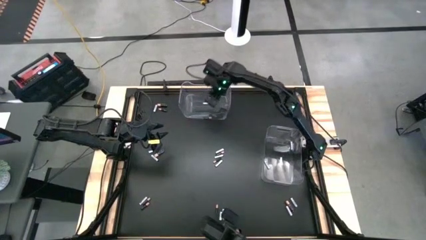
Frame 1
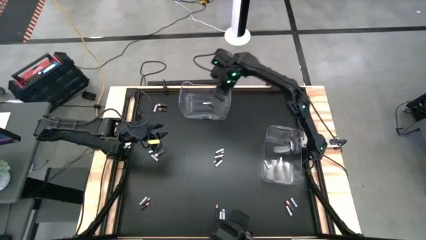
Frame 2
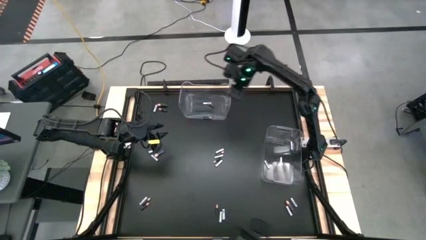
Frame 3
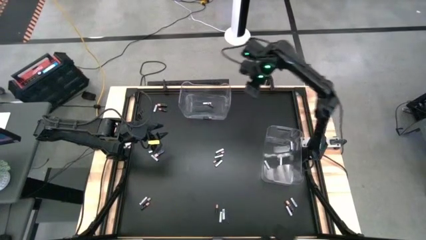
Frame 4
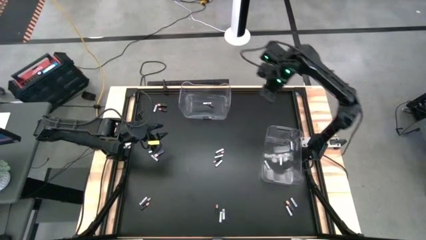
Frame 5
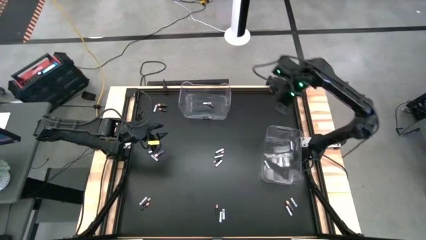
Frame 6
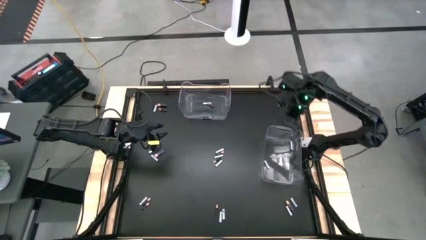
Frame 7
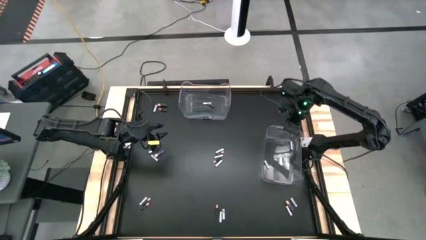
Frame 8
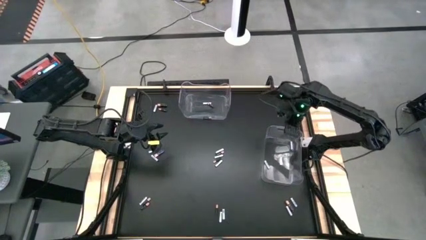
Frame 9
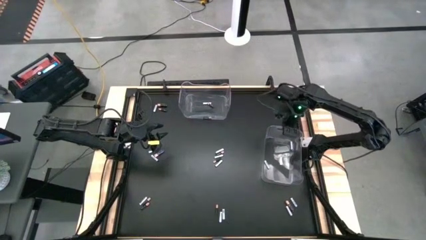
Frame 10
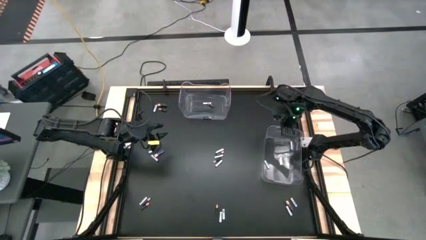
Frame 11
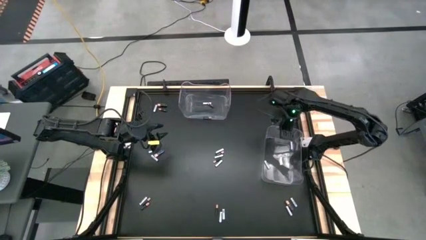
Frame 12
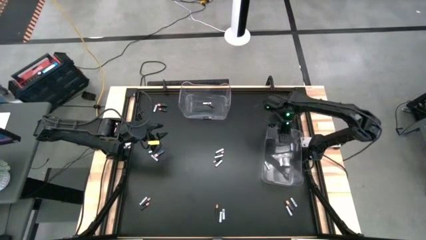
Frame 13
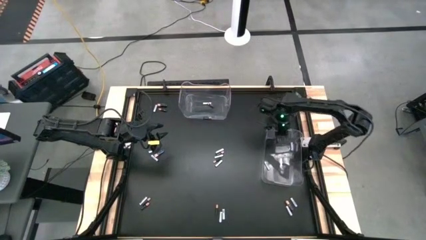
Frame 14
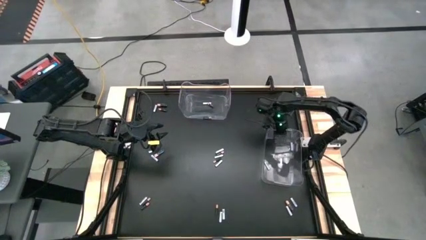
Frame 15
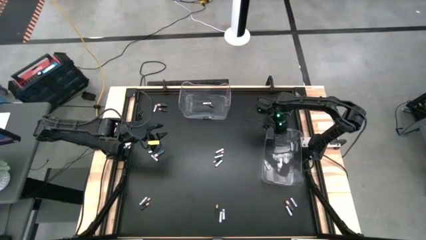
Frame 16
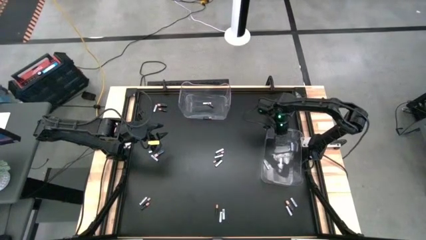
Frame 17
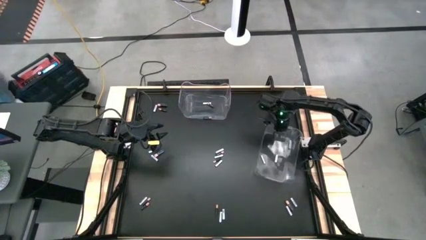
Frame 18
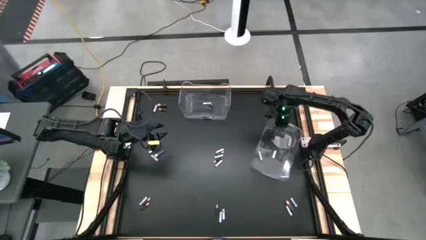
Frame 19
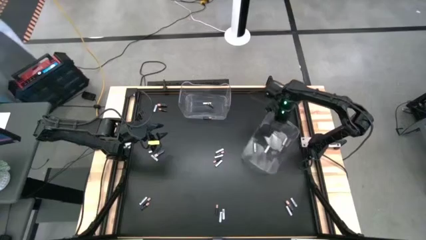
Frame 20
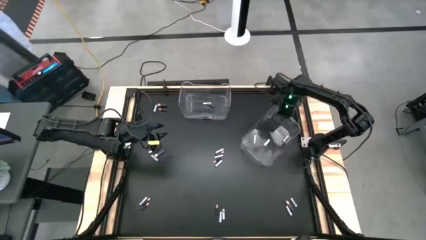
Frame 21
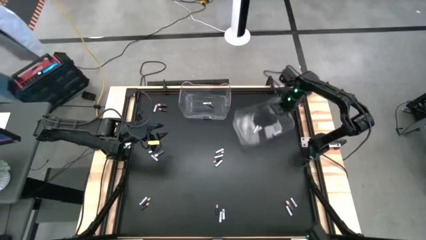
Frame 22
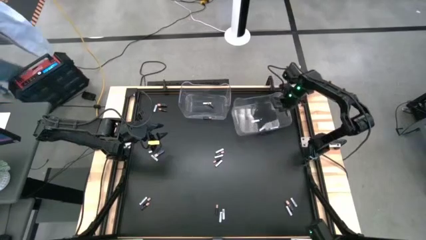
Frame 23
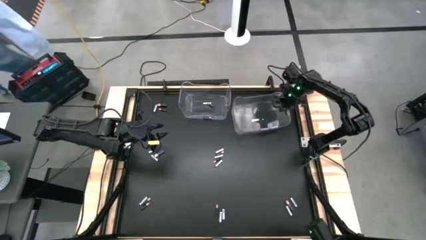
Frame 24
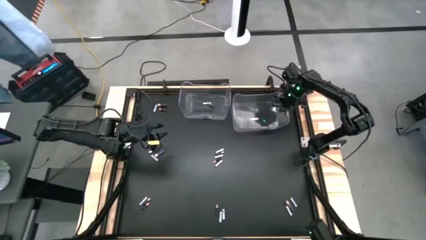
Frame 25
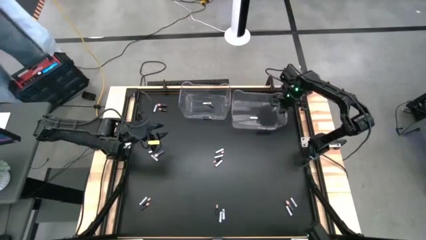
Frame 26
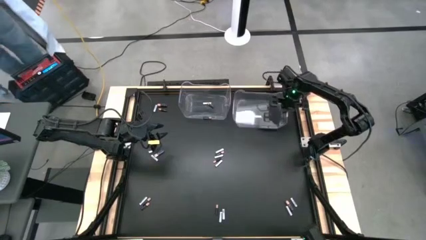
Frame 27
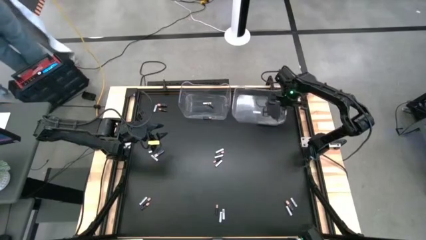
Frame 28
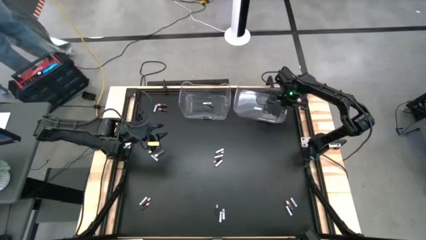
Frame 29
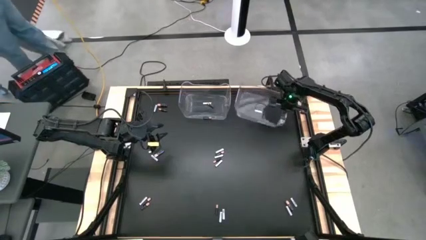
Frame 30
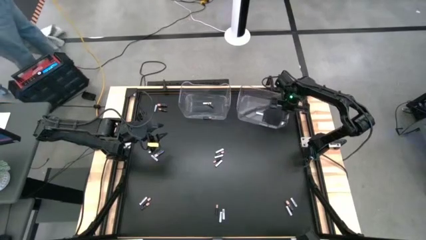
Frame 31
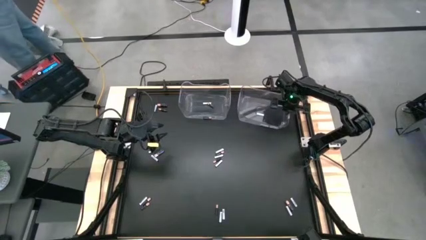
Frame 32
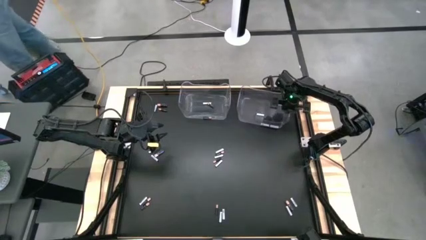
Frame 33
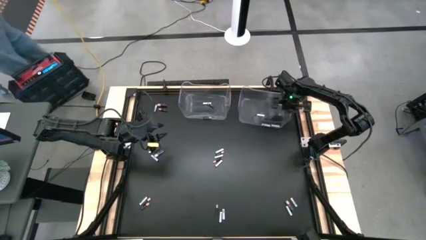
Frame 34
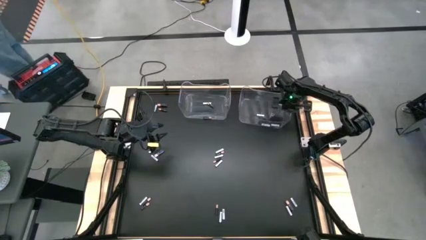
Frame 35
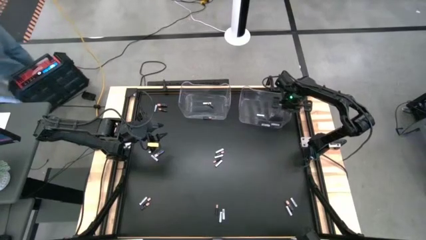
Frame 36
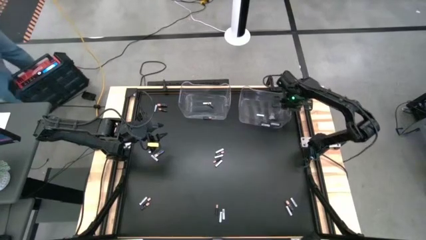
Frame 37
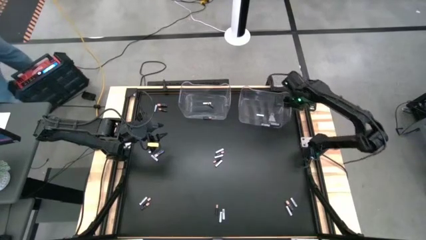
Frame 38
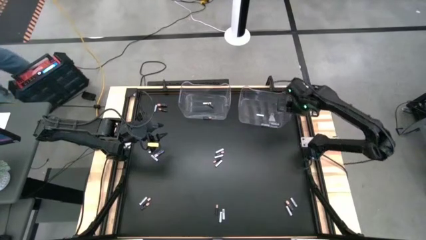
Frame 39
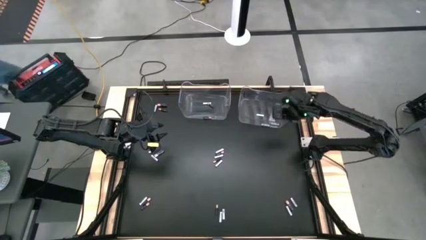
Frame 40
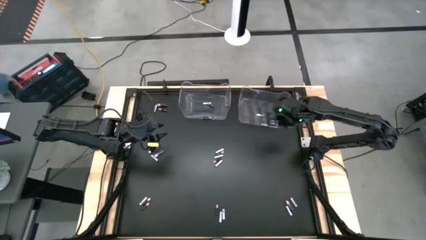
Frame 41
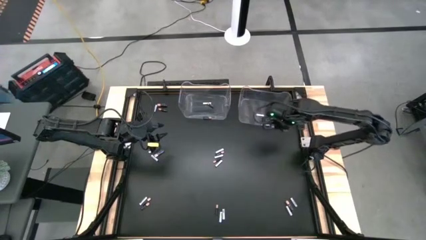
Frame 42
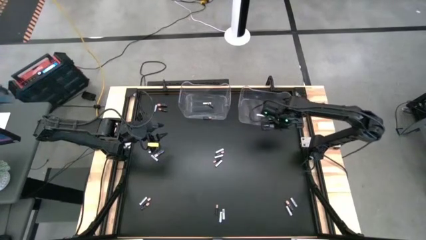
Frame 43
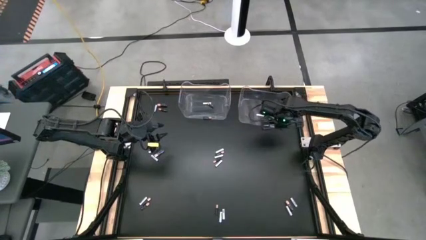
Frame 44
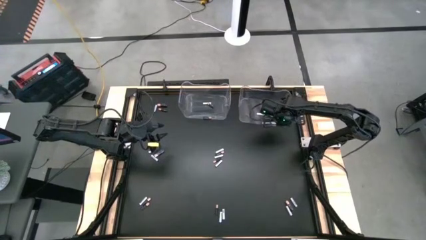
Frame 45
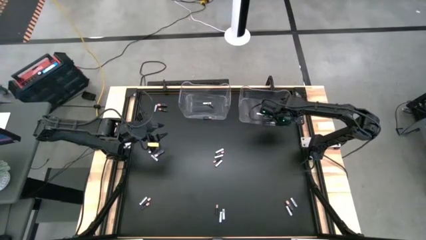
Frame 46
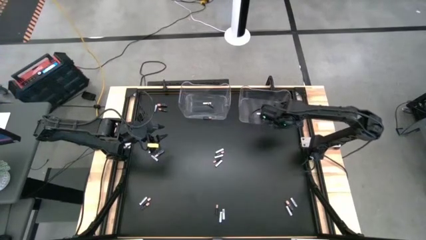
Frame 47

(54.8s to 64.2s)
Task: Sort batteries
Move the right transparent bin to the top right of the table

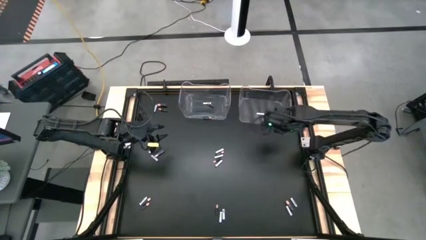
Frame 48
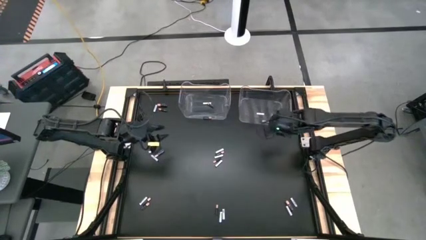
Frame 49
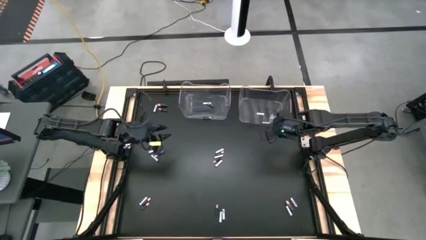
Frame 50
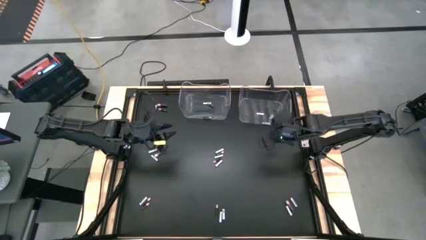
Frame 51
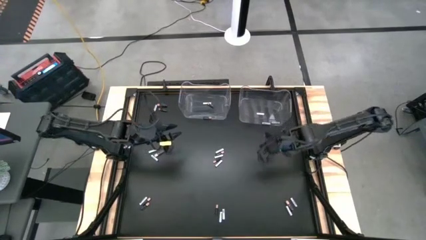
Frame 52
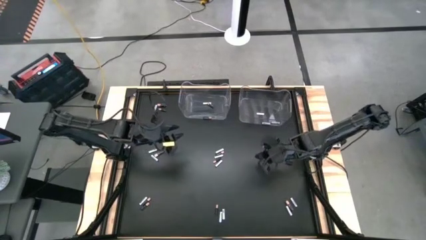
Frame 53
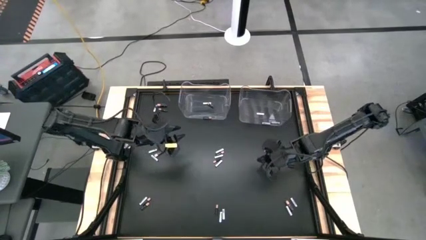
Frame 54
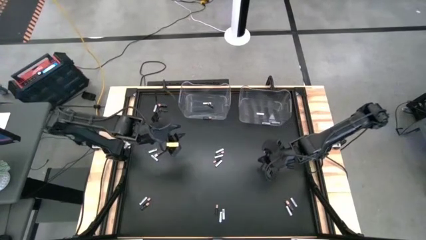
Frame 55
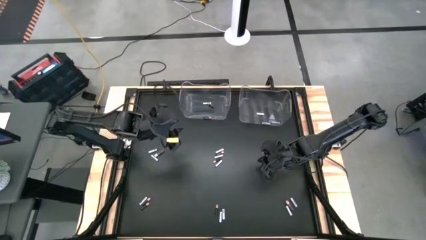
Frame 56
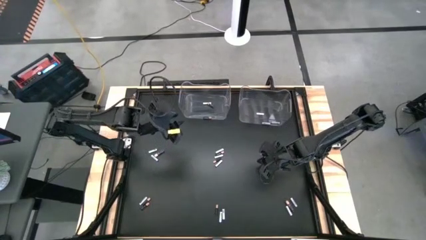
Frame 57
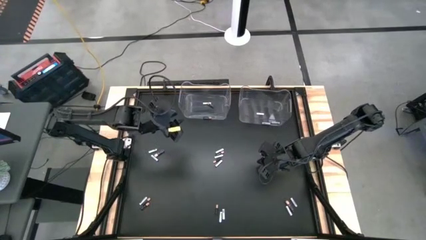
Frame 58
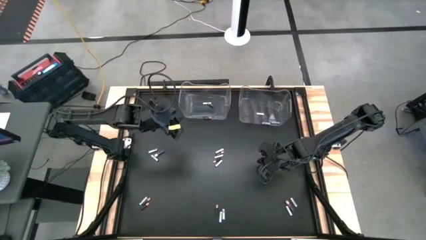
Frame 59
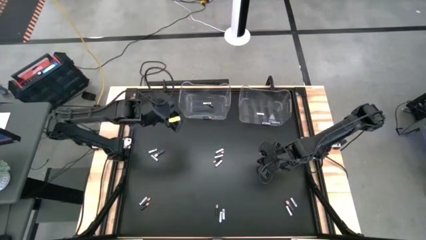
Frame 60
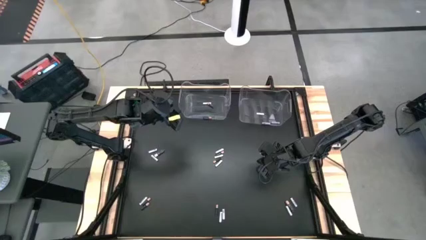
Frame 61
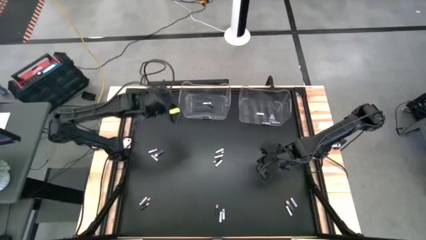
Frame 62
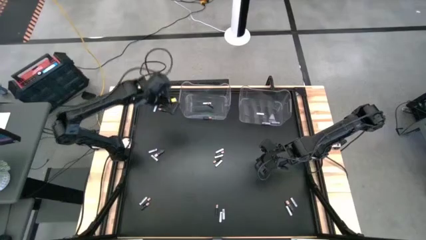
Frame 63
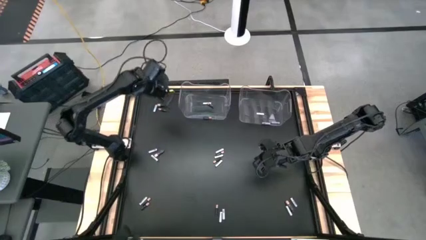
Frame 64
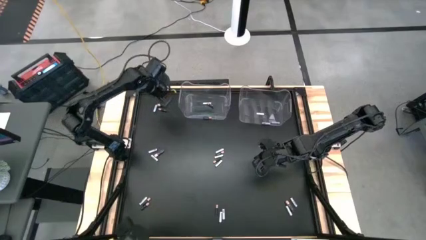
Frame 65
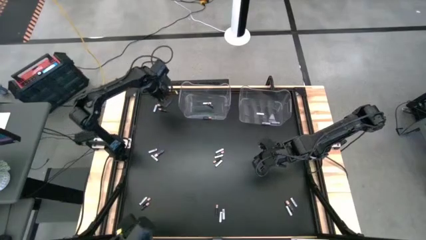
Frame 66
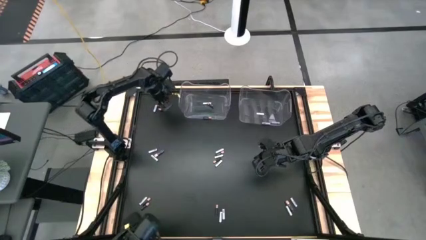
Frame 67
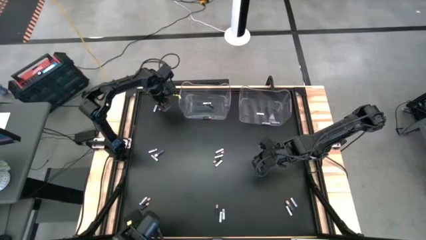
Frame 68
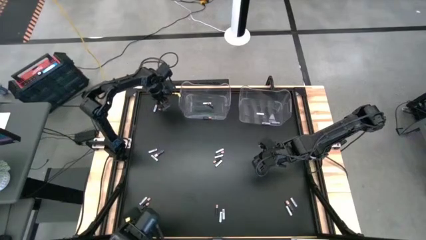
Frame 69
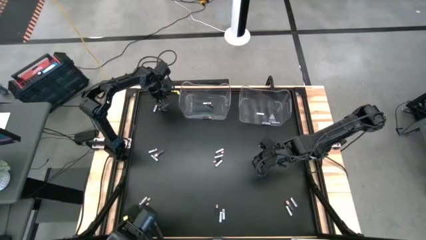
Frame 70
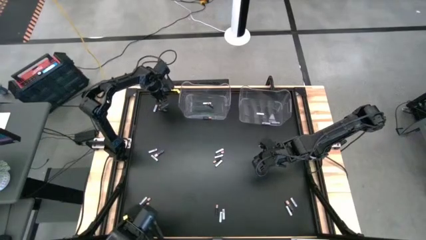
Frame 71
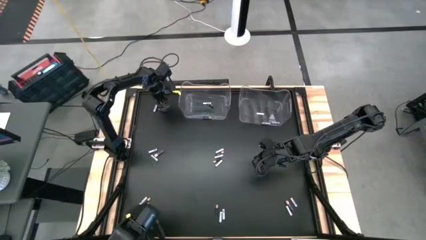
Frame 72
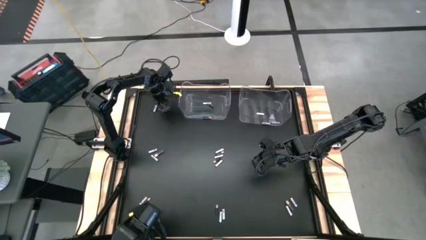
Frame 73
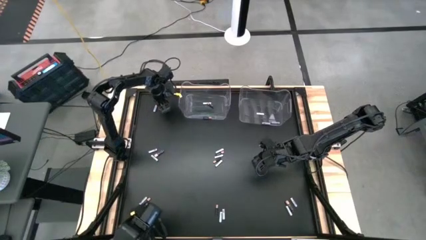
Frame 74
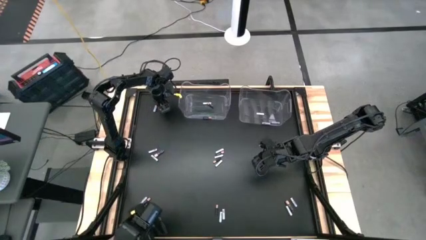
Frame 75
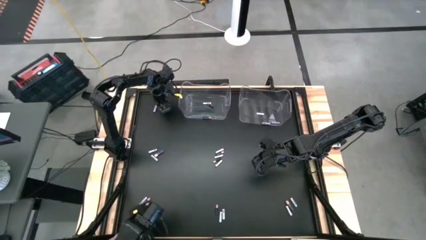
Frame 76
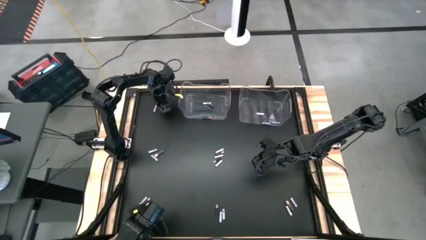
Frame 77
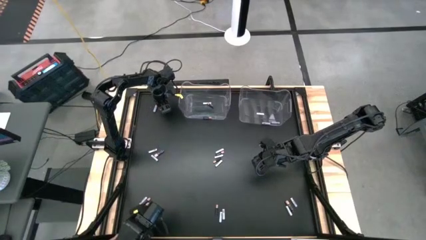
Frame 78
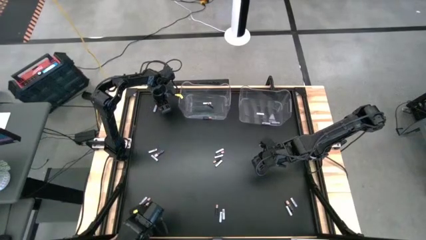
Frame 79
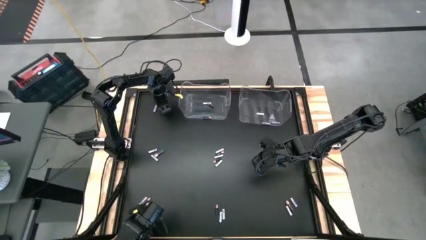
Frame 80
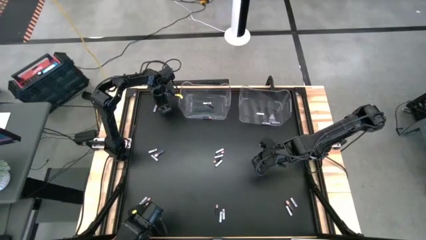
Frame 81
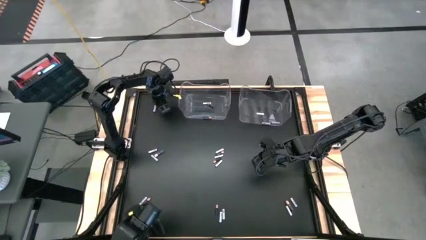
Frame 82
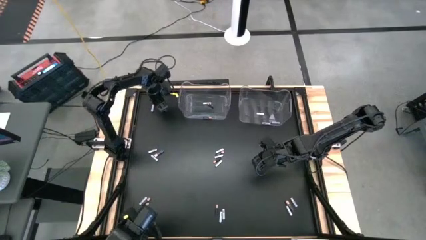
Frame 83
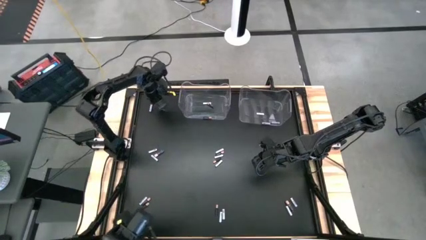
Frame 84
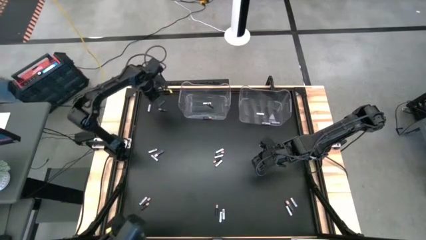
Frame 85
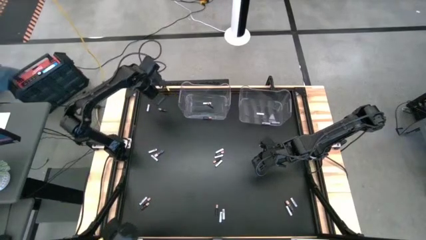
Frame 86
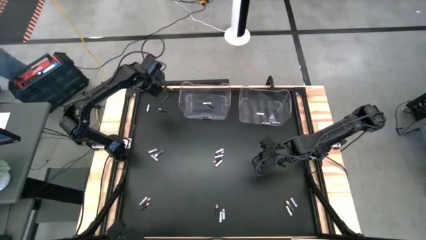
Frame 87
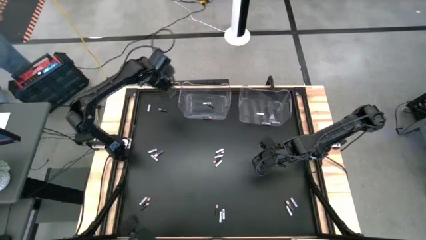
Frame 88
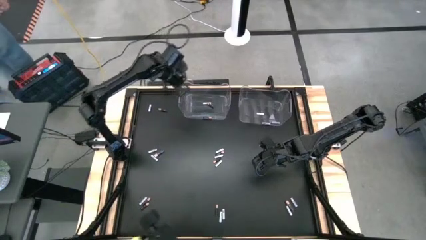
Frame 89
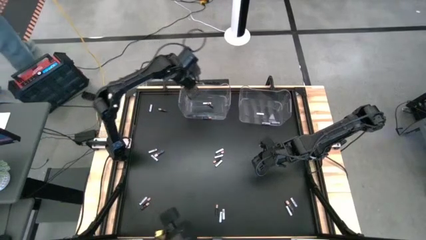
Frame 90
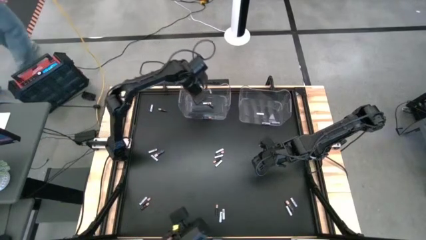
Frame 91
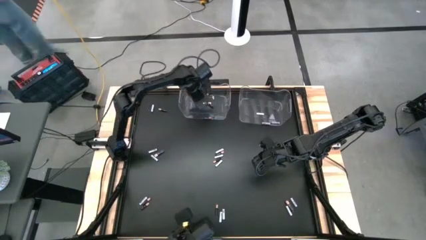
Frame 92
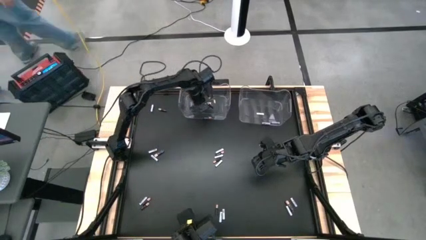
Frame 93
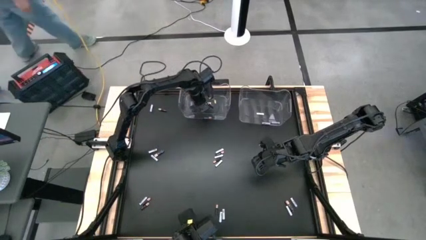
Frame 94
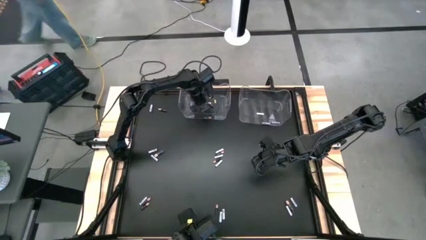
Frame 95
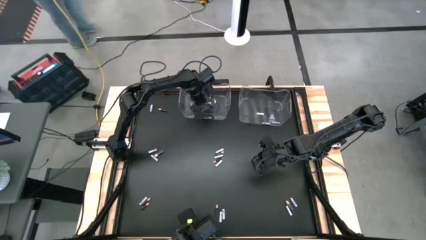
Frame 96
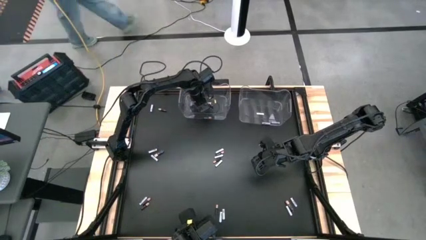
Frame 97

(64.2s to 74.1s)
Put the black battery into the left transparent bin
